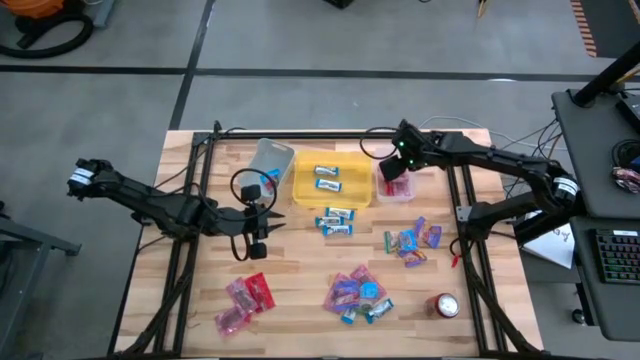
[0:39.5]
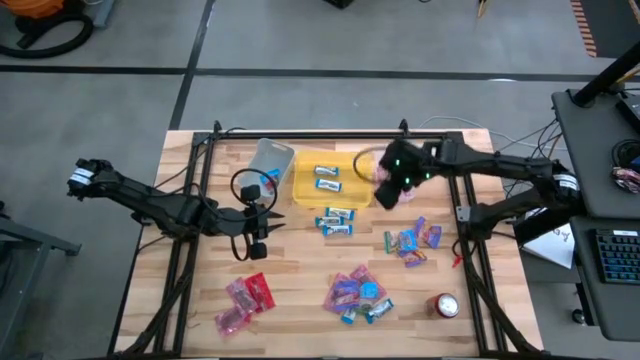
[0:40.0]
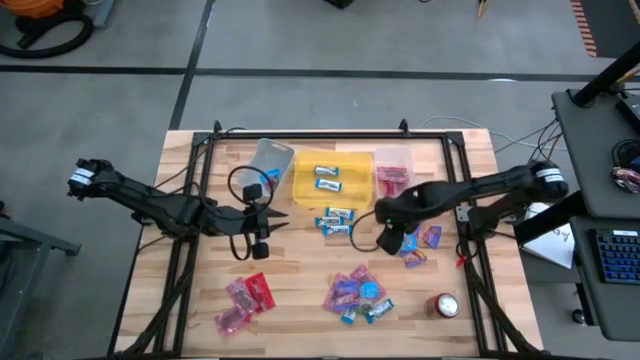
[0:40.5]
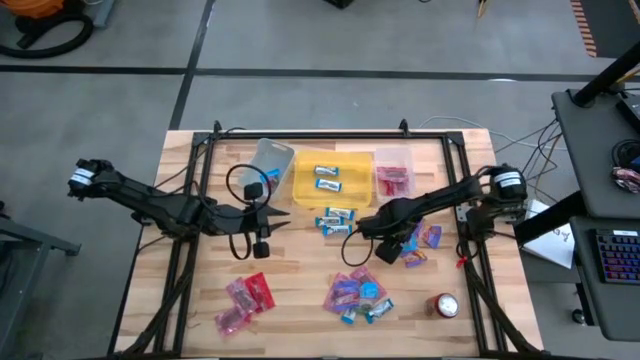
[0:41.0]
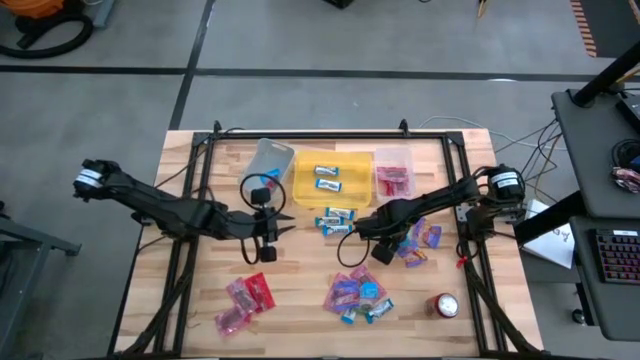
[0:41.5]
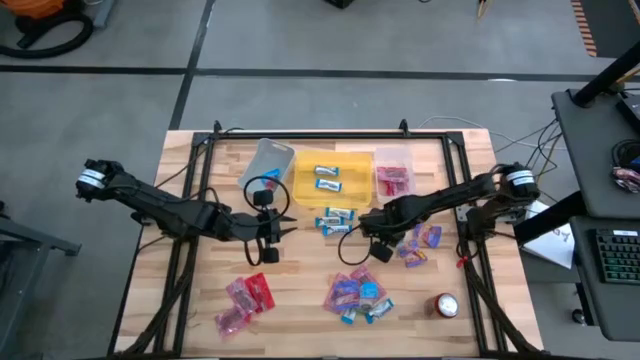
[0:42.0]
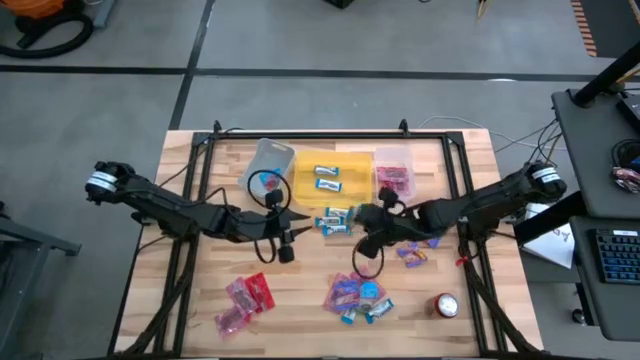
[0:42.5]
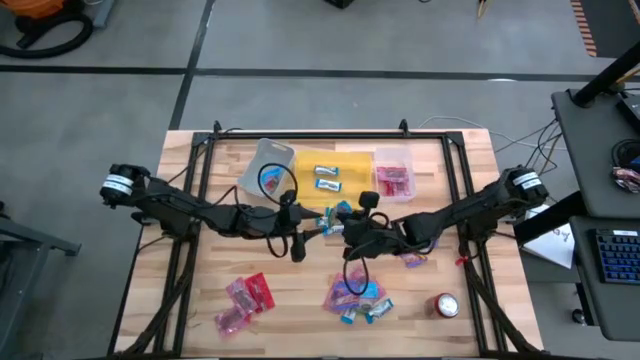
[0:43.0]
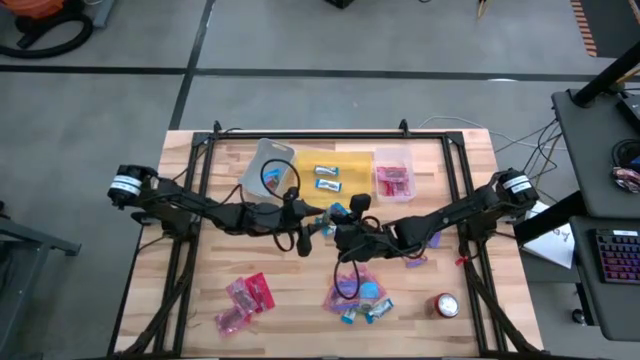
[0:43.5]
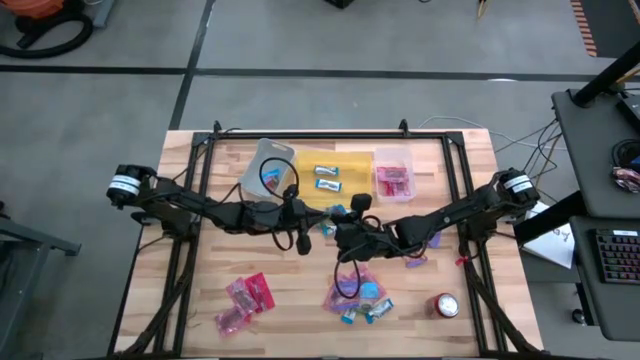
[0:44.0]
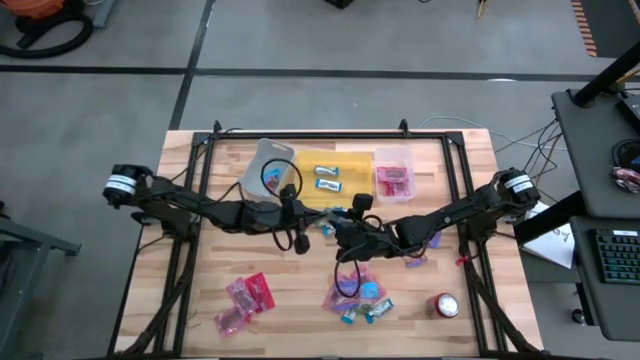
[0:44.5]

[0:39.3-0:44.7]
Task: Sort candy
Put the blue candy into the gray bin

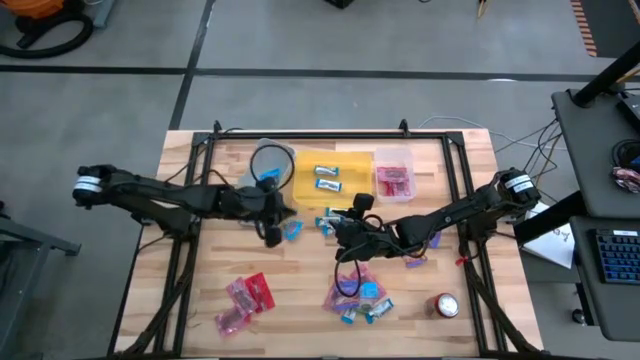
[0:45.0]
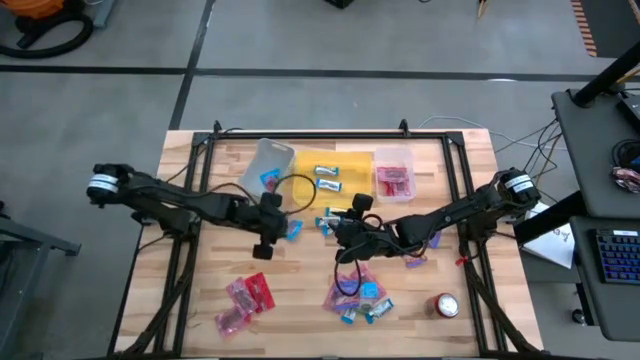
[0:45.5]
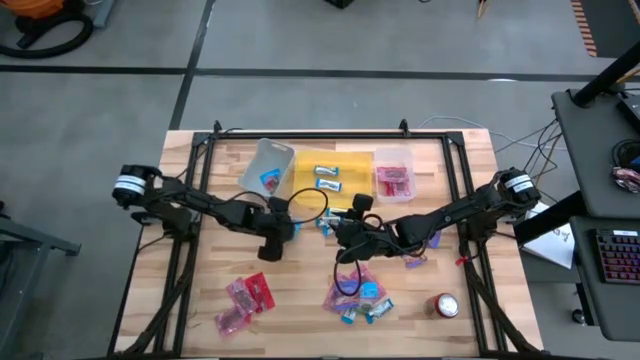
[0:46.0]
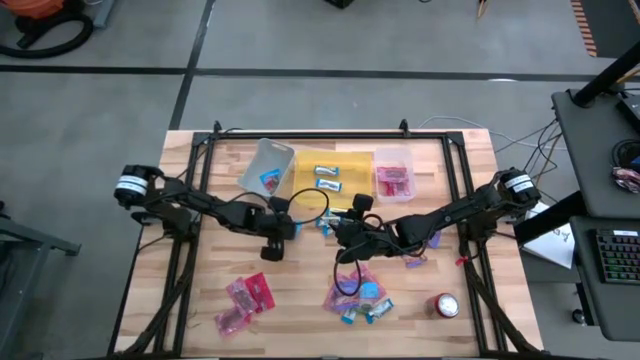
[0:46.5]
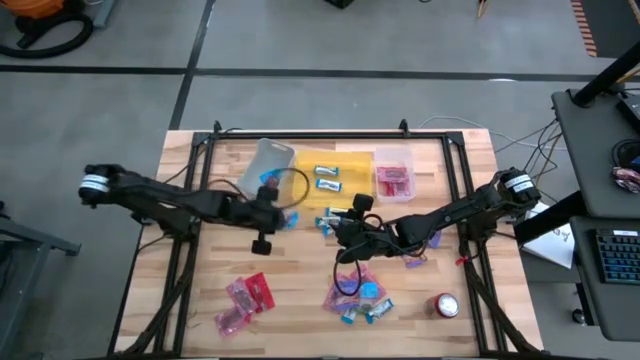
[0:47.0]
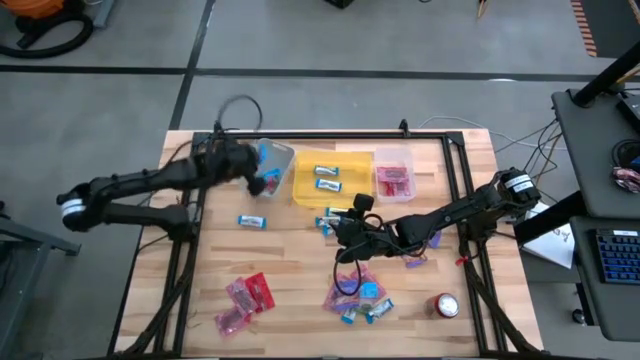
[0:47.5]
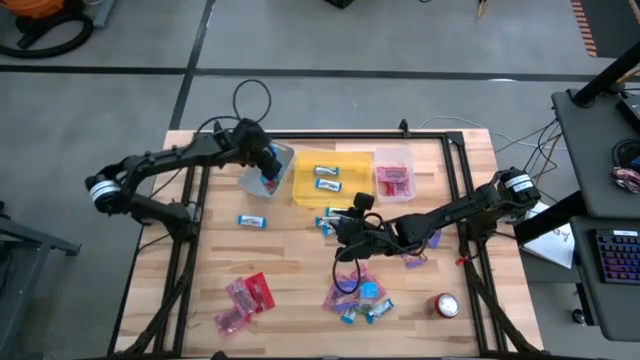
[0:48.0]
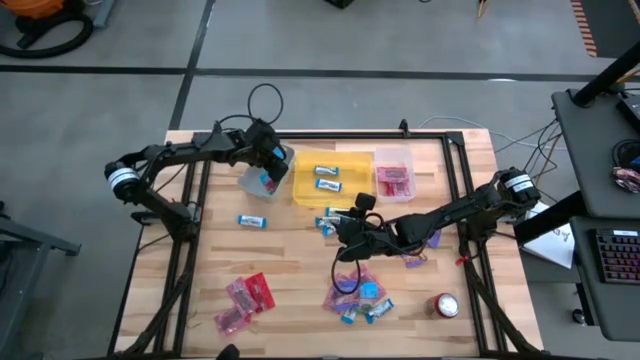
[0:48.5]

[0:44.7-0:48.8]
Put the blue candy into the gray bin

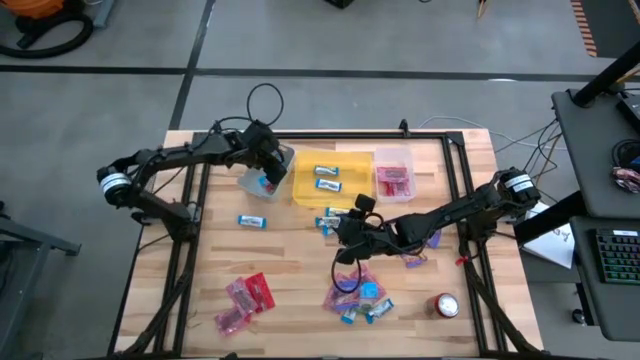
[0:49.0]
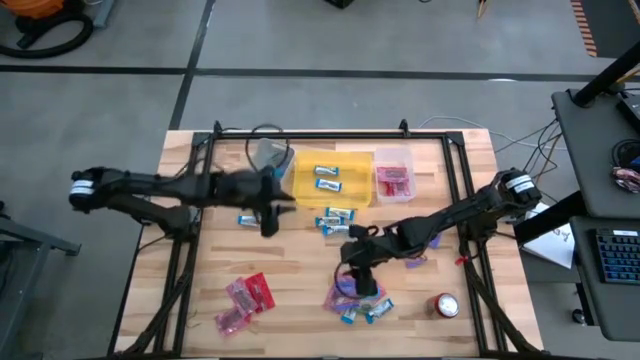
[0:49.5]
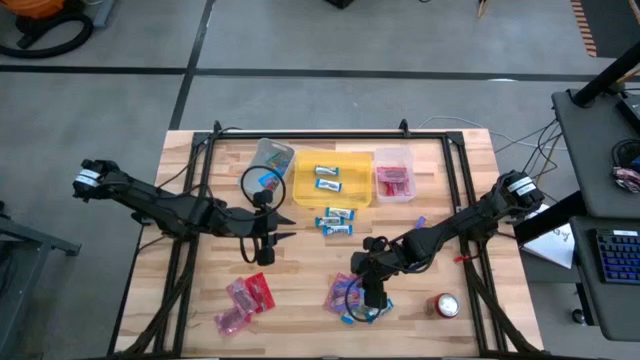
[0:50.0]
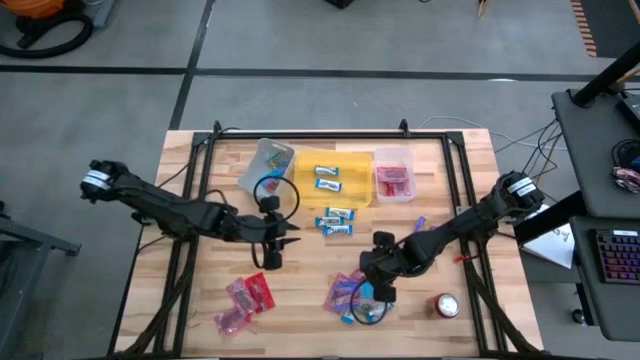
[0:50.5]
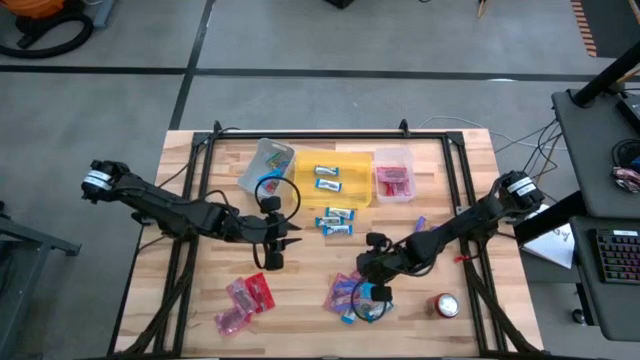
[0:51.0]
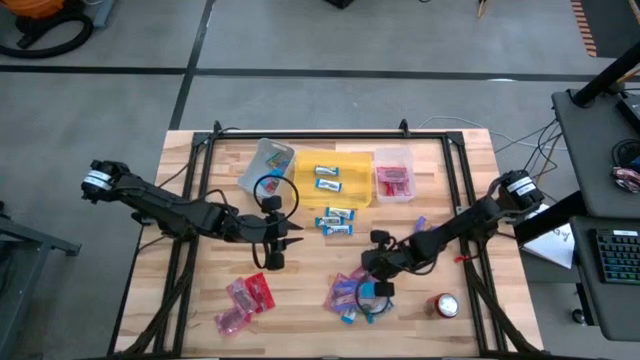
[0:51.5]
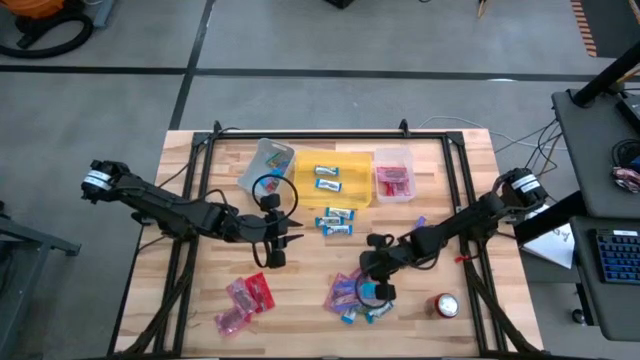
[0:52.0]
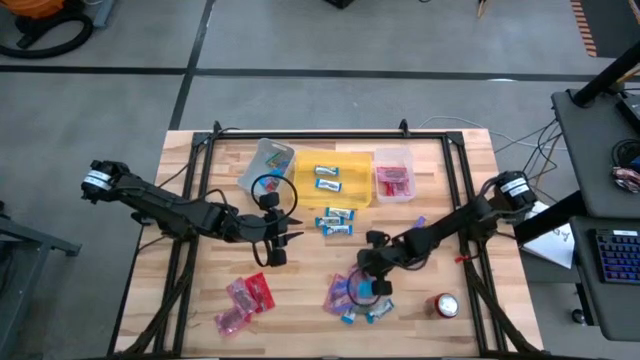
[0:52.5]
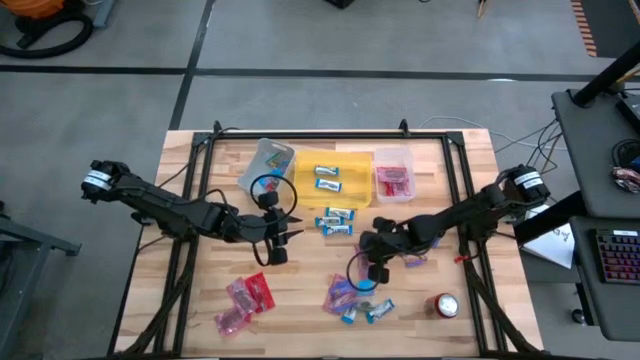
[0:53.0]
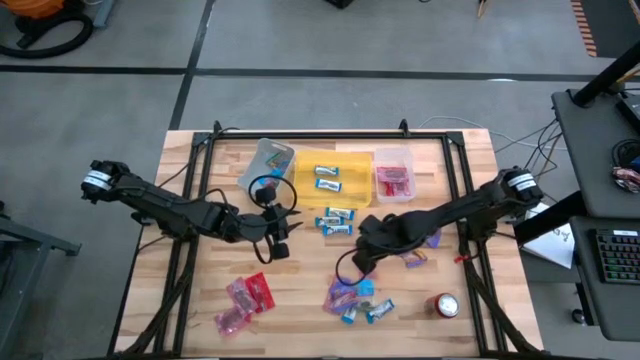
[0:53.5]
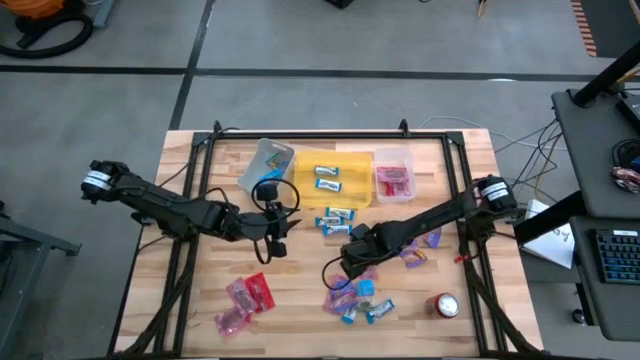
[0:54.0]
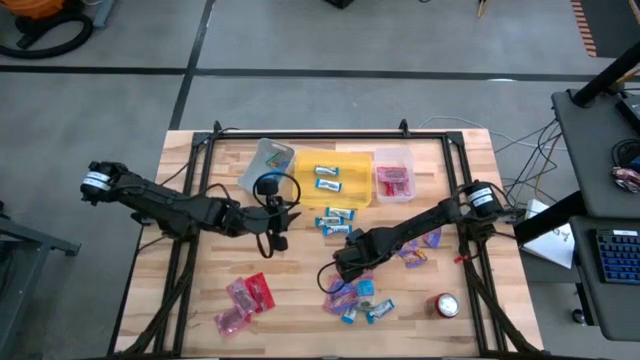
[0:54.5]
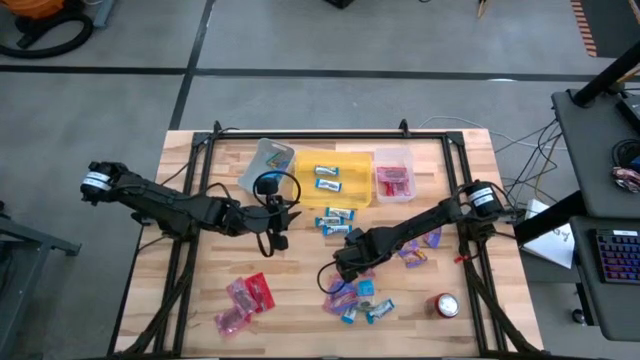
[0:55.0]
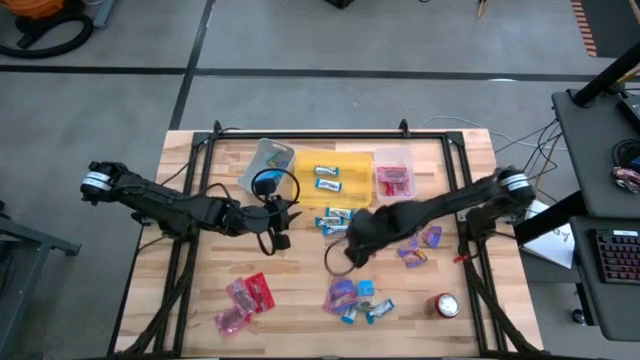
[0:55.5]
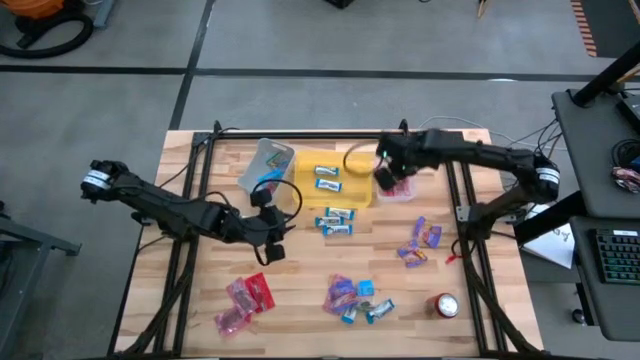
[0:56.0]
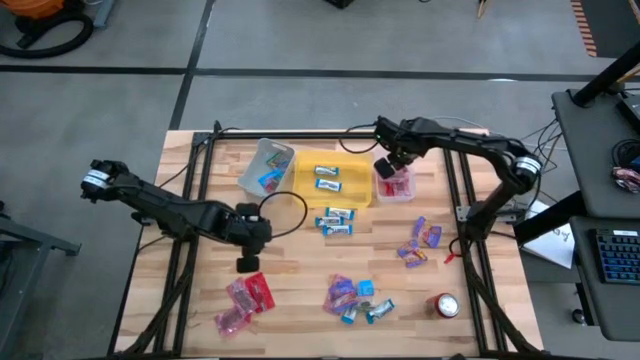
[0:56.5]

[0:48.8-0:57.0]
Put the red candy into the transparent bin

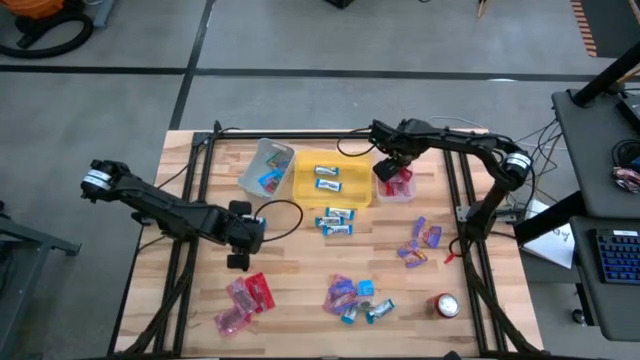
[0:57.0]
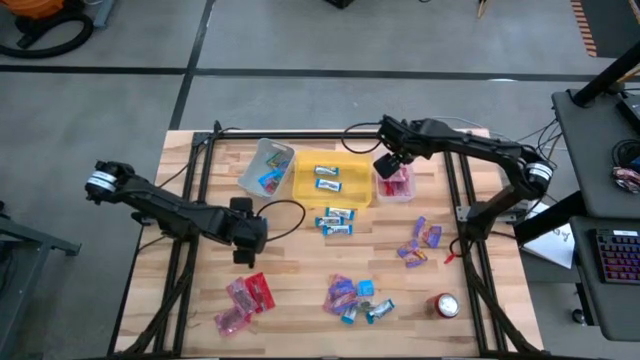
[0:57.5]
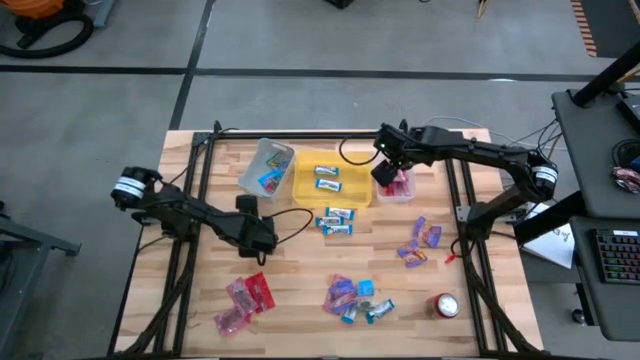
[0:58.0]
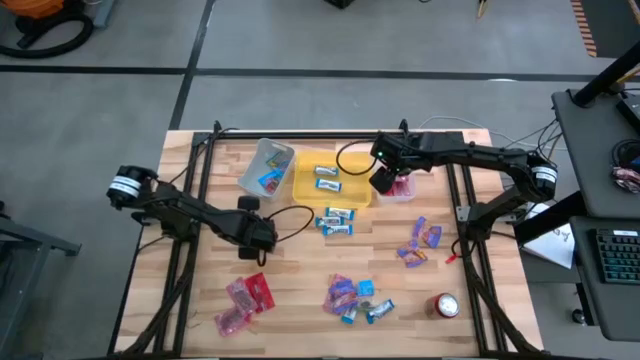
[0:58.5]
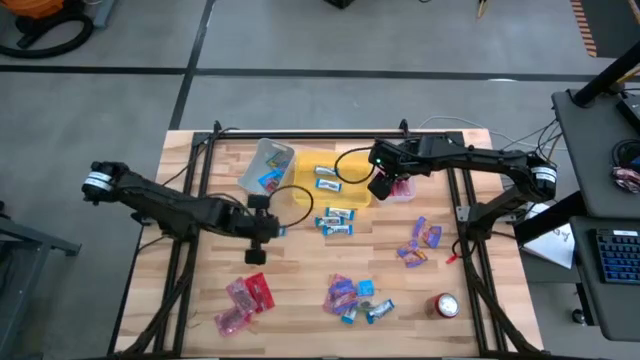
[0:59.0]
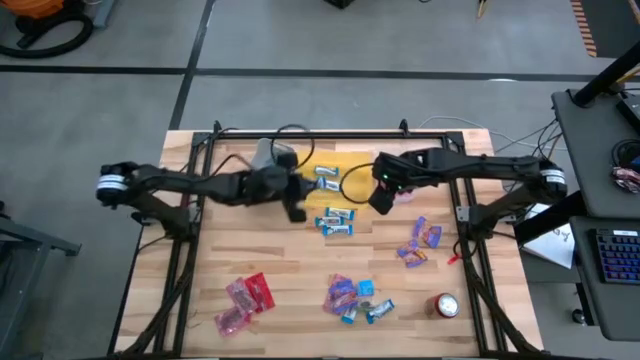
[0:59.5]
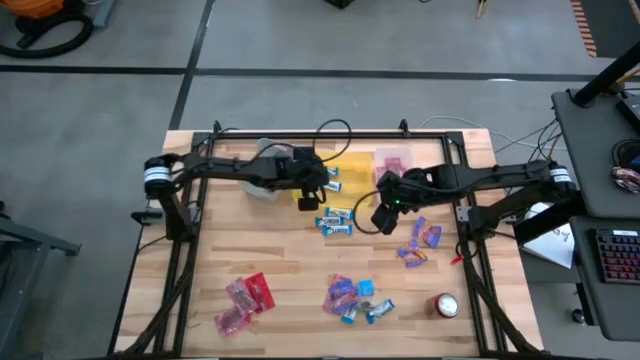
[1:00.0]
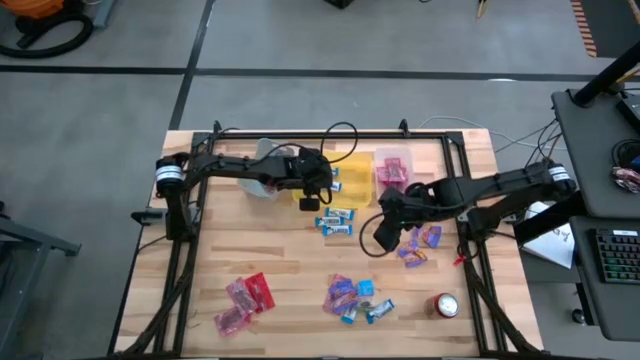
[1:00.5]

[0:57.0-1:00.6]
Put the white chocolate into the yellow bin
